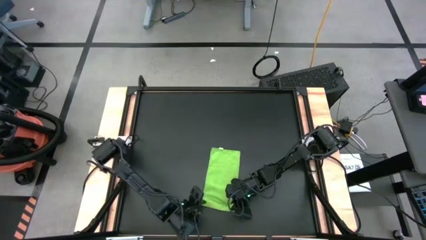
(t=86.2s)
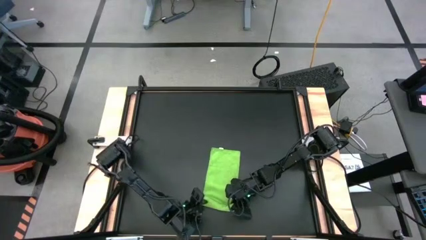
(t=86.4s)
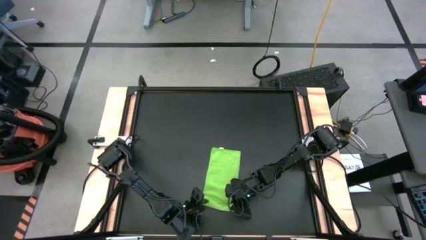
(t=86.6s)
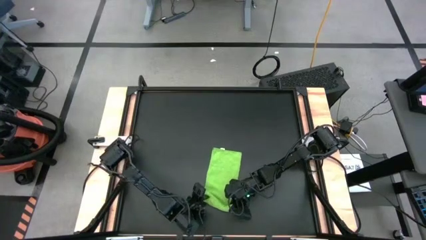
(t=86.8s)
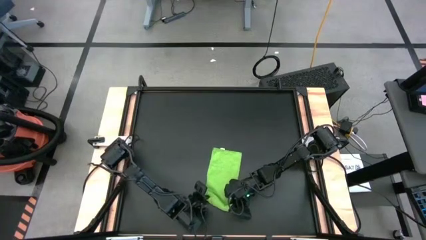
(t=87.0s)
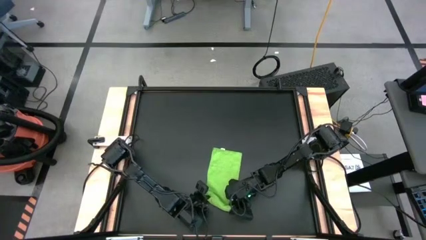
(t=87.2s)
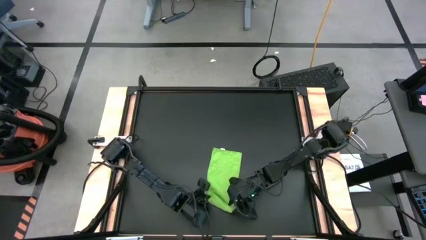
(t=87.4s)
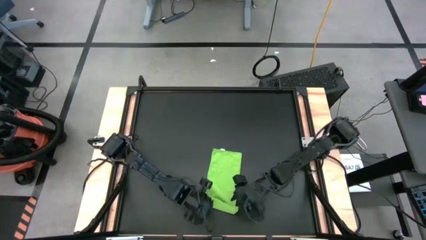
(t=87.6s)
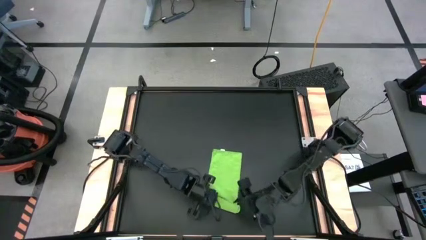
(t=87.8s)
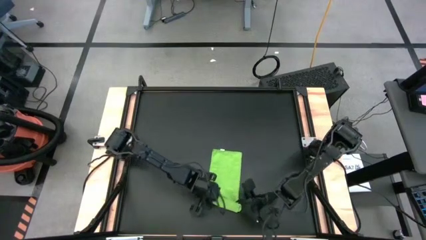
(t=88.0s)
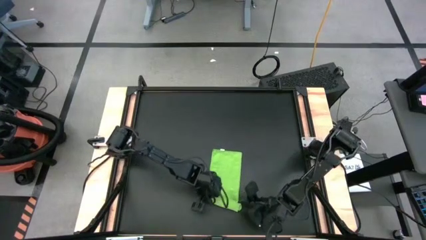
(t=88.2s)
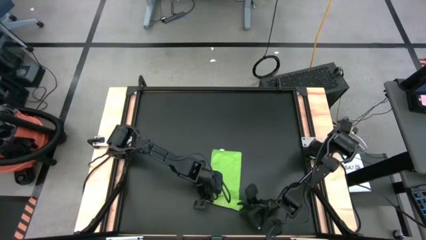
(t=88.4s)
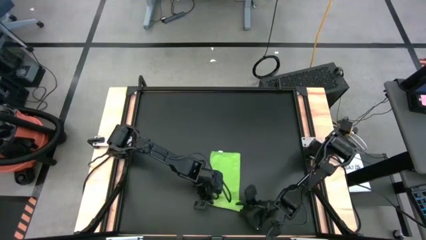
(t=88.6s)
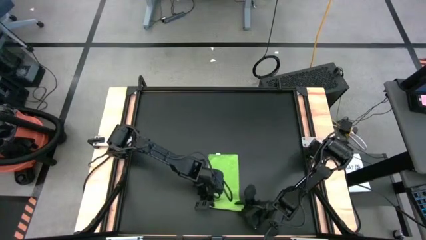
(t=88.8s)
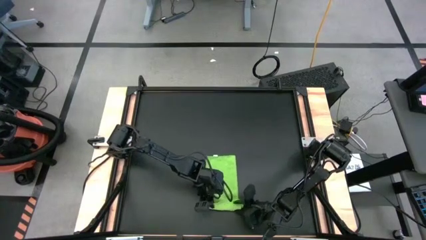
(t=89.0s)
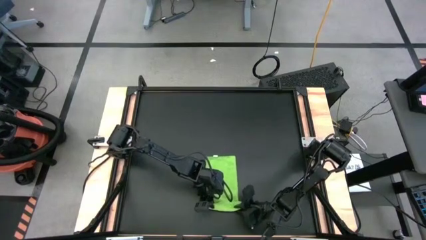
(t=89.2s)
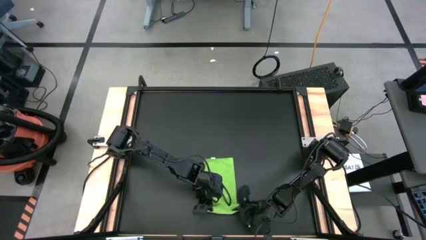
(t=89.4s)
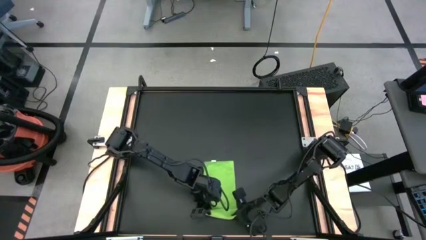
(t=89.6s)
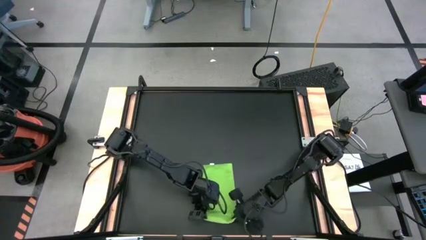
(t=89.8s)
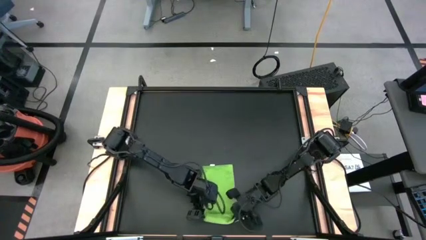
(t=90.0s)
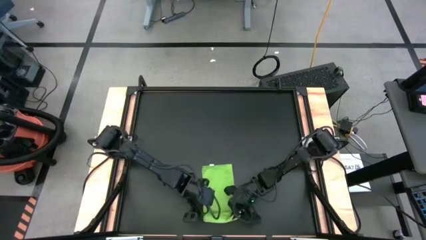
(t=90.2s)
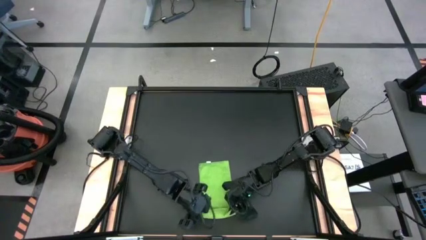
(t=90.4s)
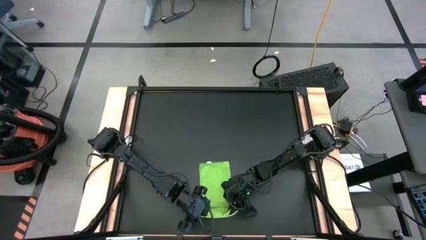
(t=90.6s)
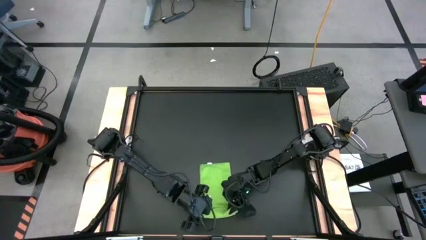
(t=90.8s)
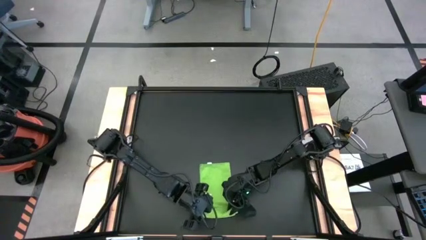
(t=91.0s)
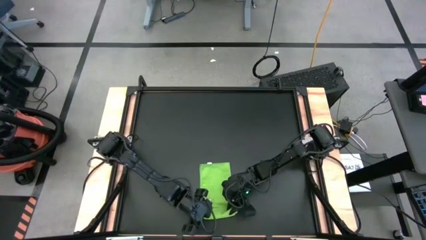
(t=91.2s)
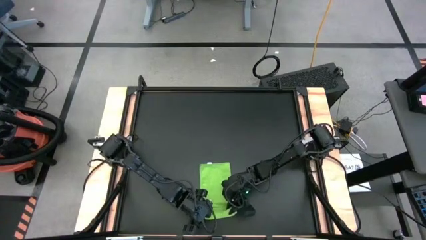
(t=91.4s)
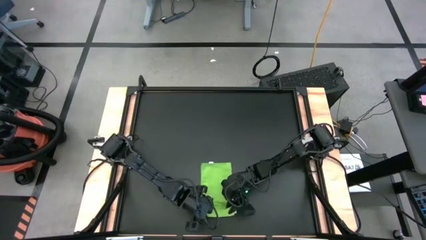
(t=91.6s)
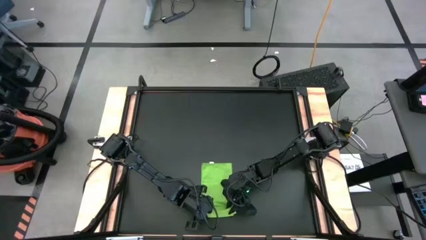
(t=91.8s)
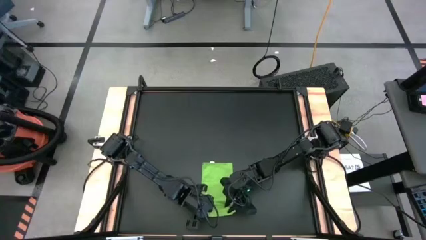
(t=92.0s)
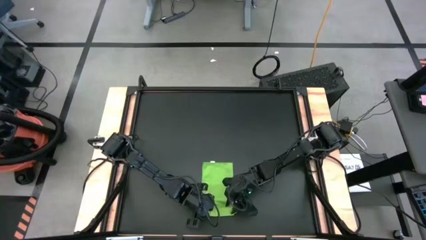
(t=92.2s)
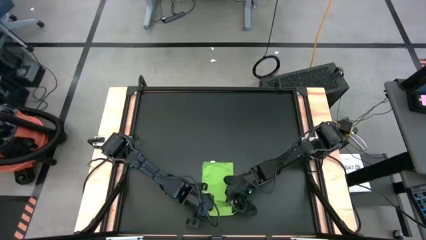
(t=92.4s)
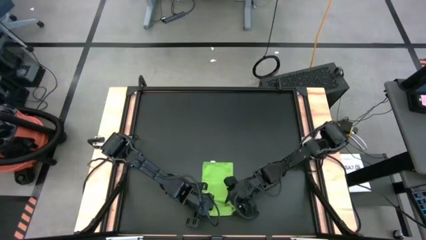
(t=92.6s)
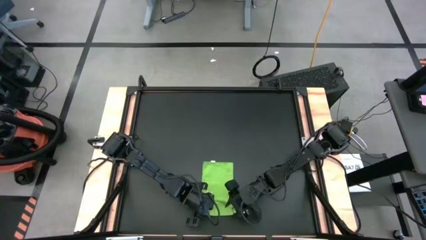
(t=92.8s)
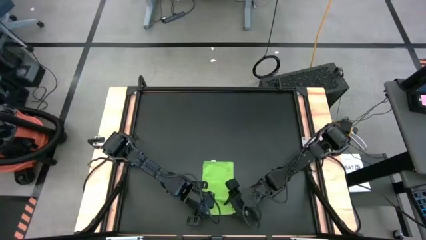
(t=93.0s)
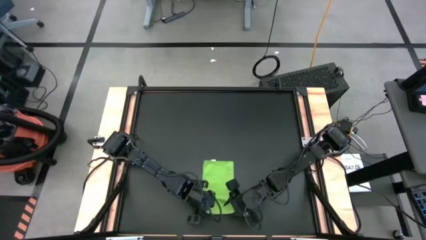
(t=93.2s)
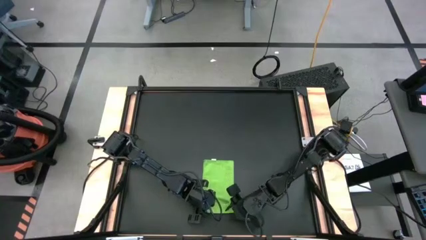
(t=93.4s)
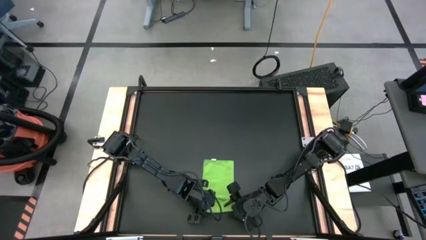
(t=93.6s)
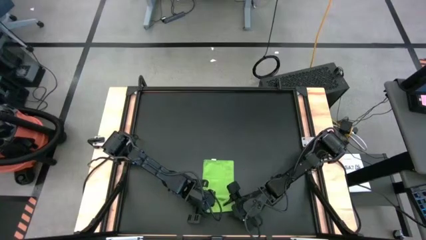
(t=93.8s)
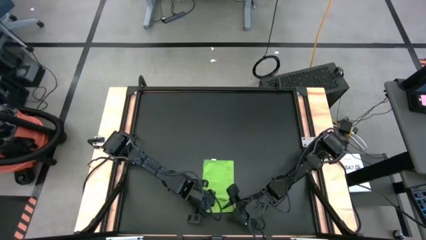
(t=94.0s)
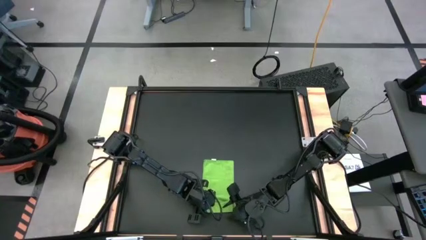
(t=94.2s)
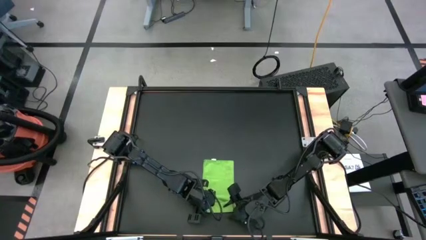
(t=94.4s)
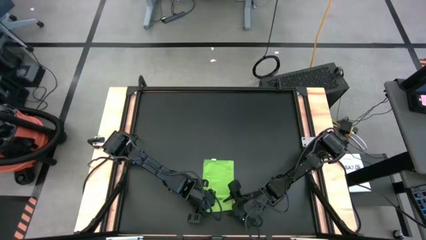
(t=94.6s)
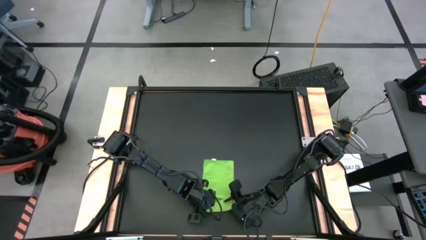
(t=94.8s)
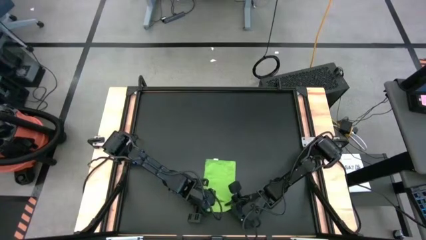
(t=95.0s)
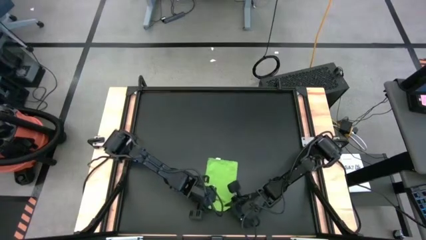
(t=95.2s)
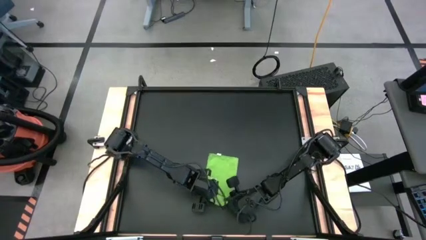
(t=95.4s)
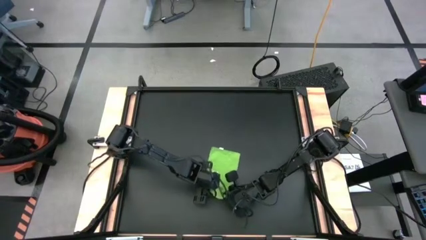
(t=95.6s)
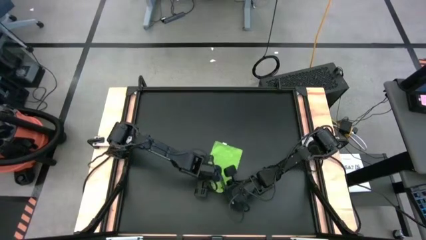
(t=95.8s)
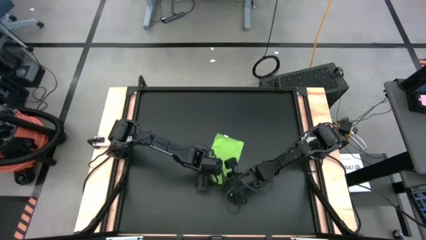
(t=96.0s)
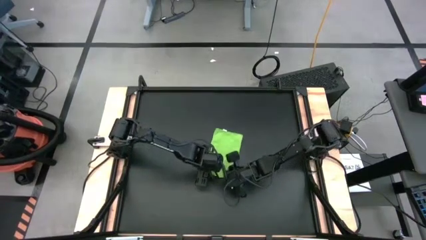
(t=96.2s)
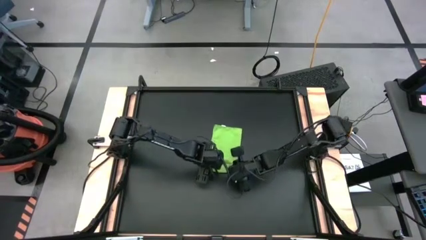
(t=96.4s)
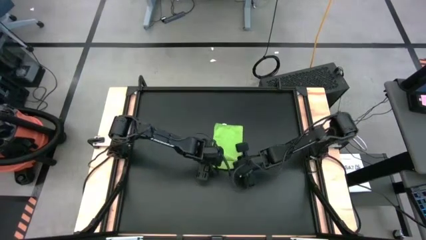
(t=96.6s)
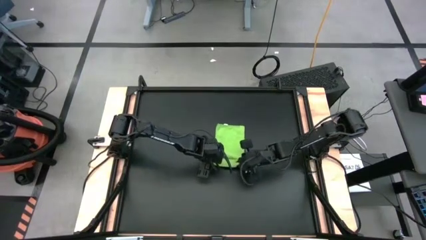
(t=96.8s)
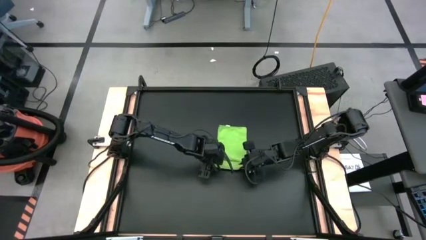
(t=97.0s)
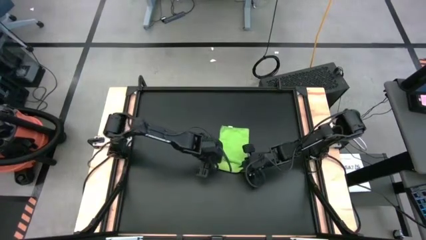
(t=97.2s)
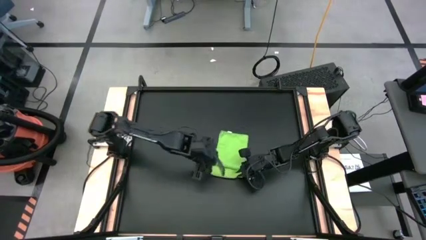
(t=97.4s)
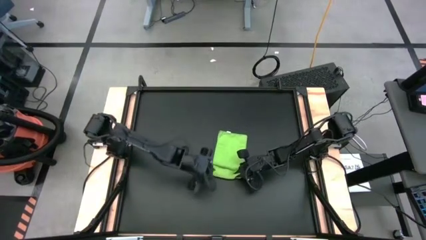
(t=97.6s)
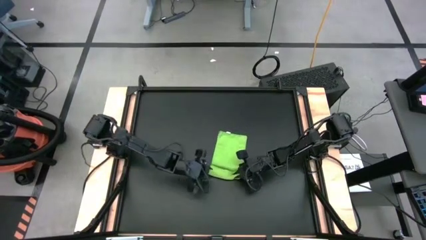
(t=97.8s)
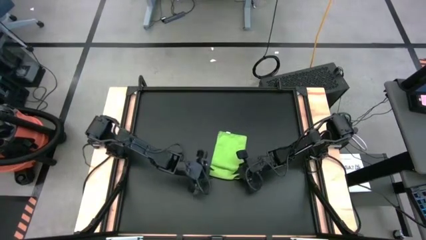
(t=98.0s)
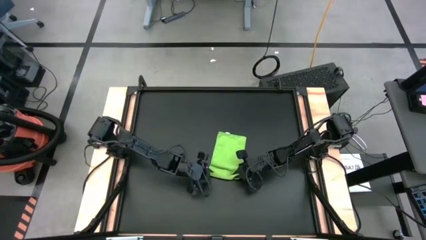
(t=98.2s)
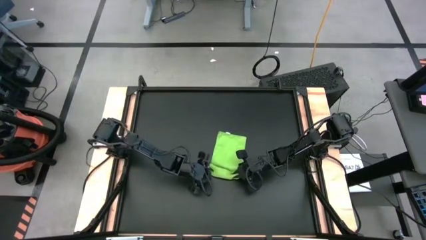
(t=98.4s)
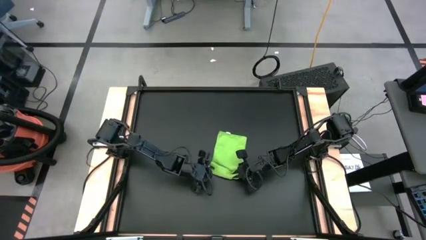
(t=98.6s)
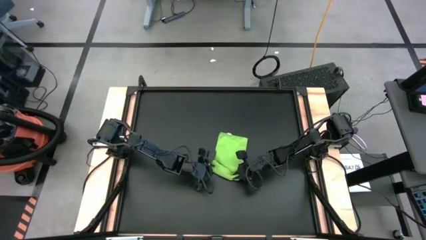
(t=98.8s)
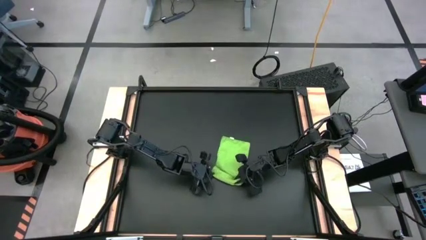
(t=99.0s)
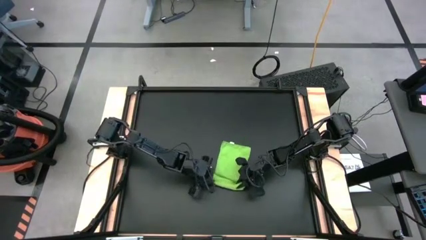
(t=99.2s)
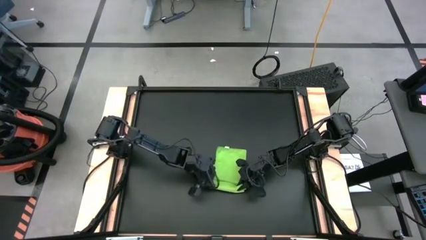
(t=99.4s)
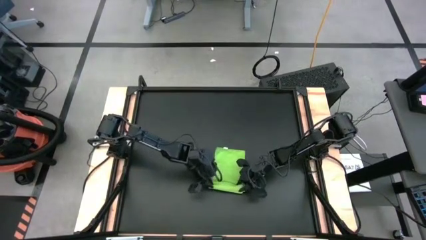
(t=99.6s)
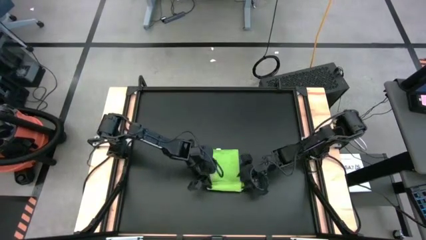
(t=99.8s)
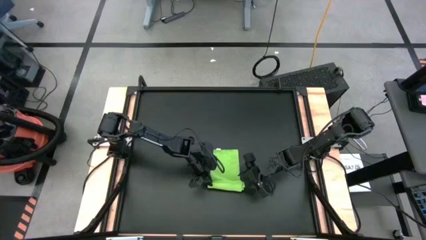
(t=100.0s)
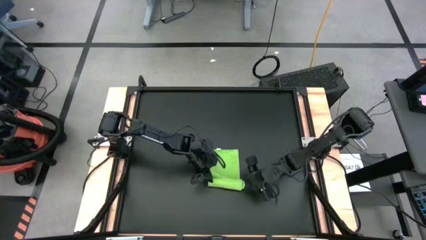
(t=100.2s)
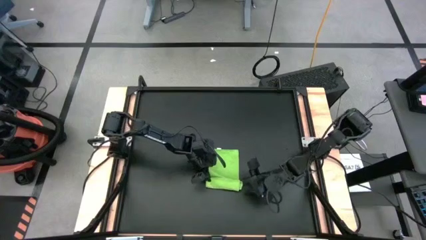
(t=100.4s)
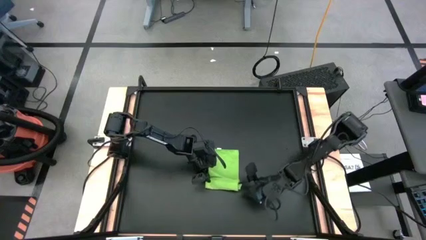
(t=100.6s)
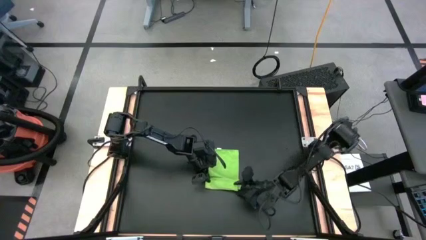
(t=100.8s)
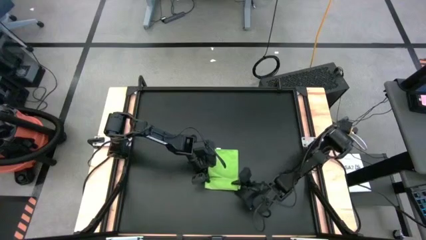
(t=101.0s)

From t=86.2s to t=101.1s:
Task: Roll towel into tight, uniform cylinder
Roll the green towel
